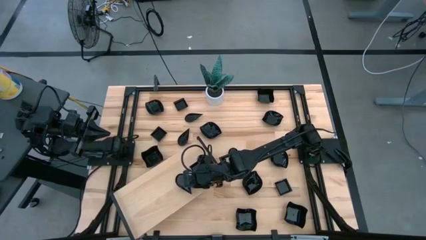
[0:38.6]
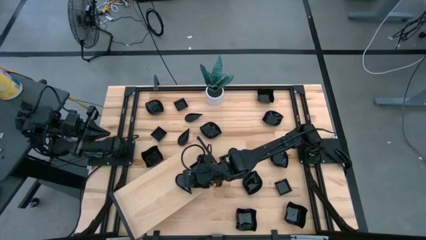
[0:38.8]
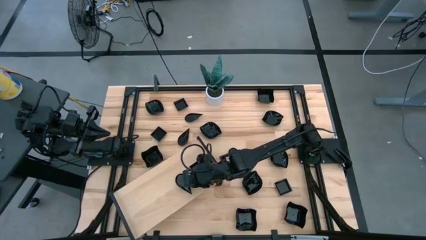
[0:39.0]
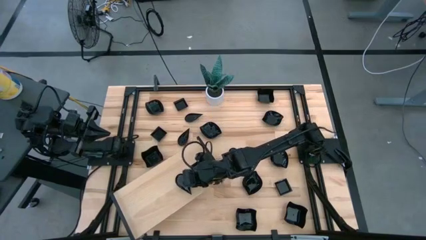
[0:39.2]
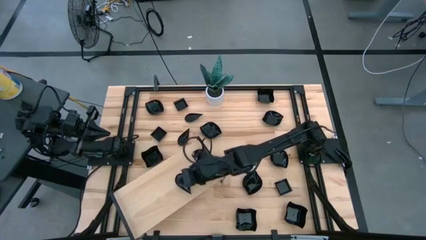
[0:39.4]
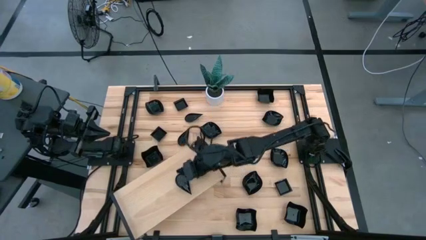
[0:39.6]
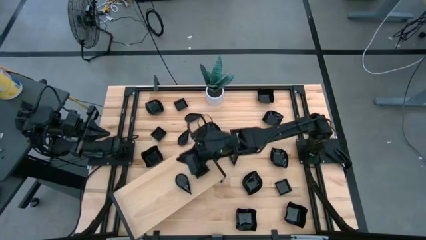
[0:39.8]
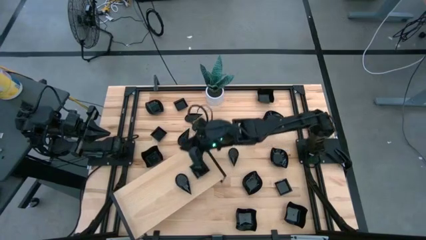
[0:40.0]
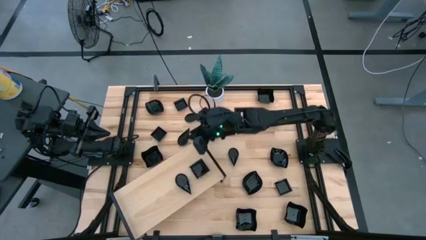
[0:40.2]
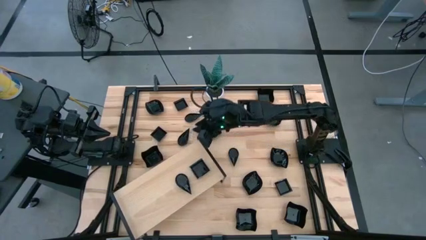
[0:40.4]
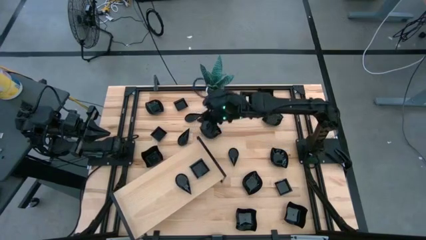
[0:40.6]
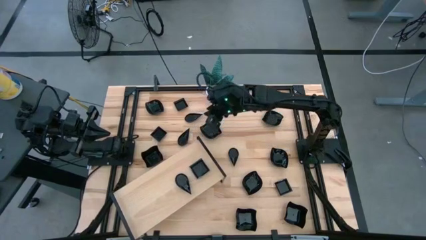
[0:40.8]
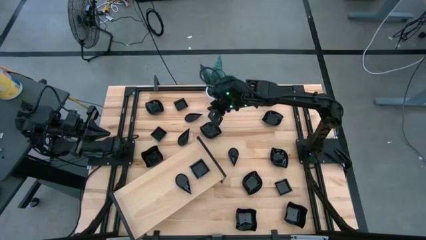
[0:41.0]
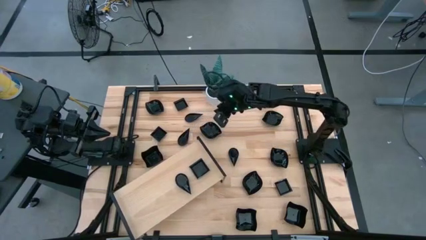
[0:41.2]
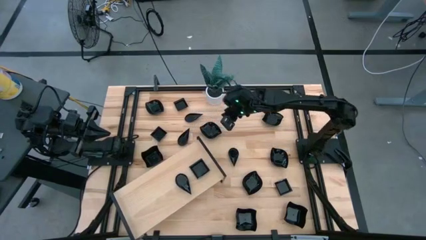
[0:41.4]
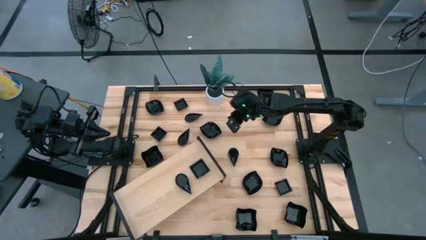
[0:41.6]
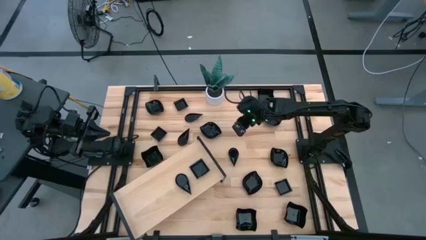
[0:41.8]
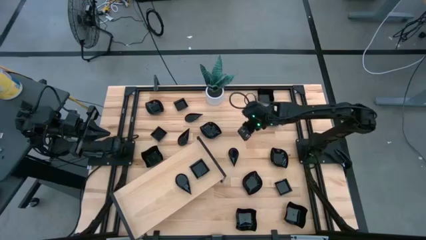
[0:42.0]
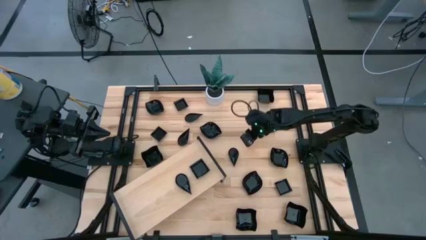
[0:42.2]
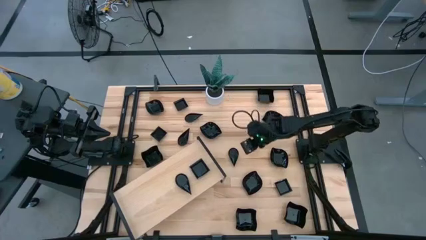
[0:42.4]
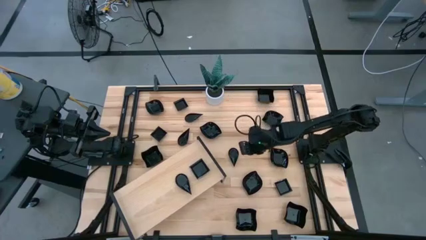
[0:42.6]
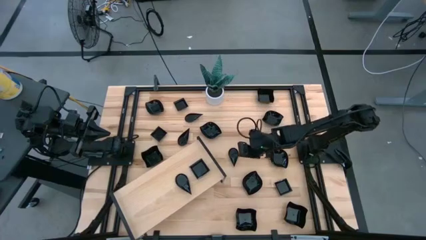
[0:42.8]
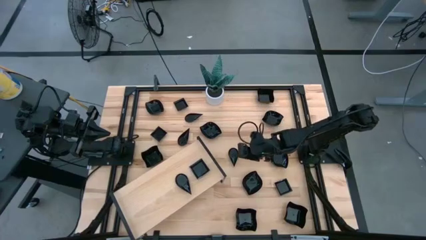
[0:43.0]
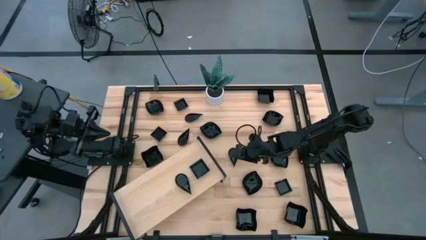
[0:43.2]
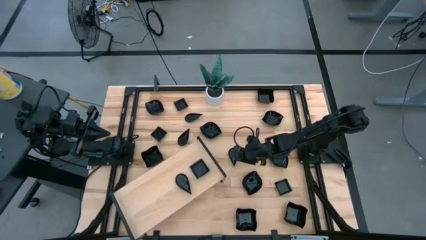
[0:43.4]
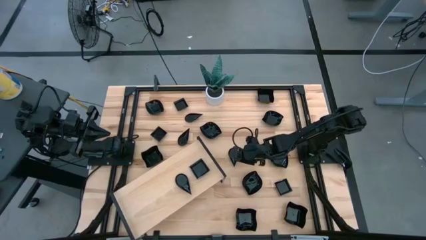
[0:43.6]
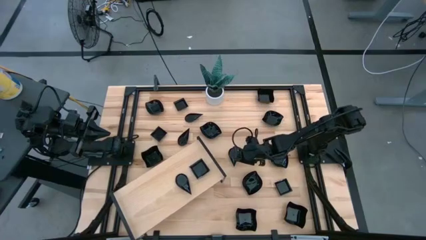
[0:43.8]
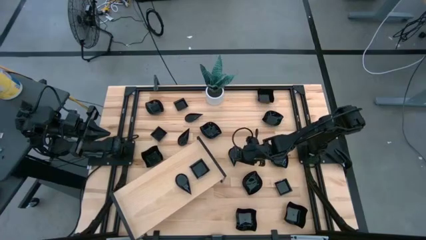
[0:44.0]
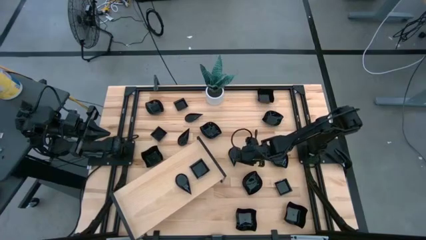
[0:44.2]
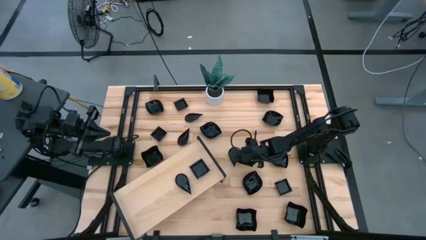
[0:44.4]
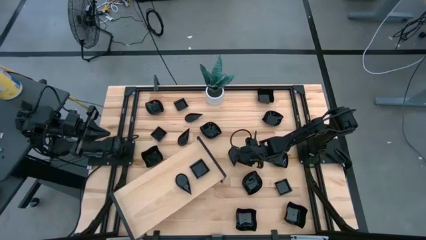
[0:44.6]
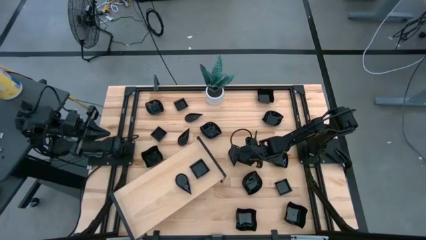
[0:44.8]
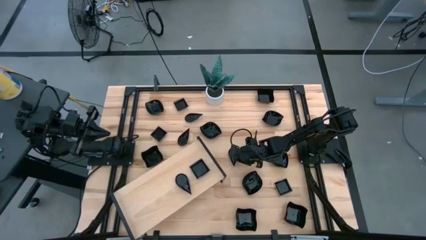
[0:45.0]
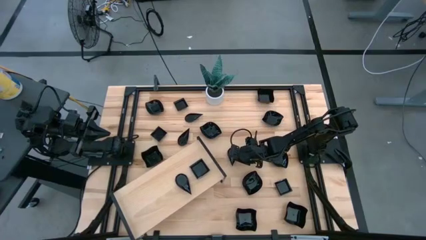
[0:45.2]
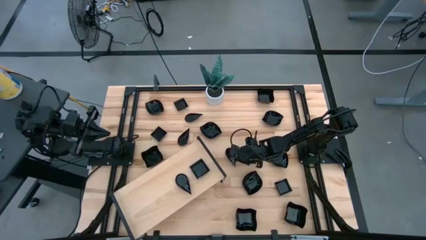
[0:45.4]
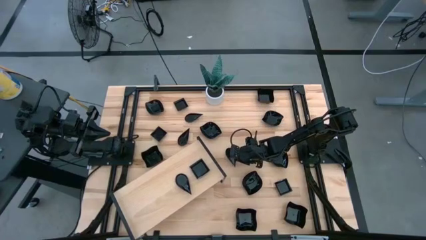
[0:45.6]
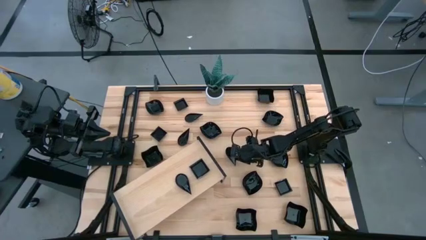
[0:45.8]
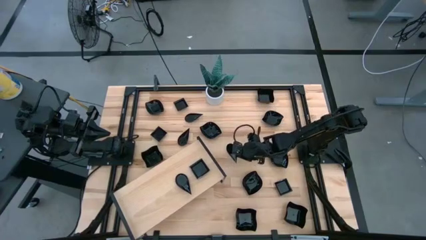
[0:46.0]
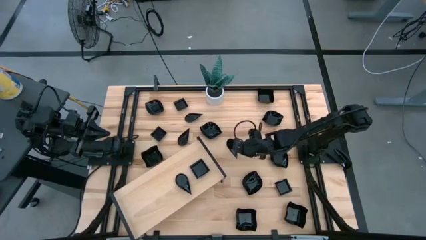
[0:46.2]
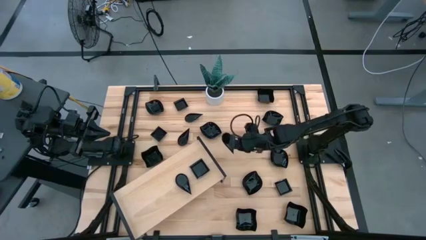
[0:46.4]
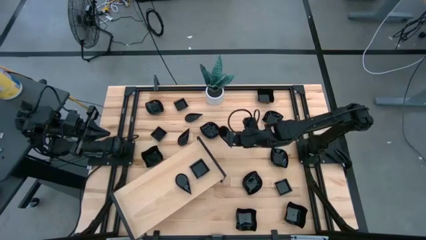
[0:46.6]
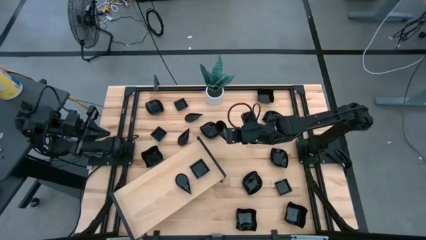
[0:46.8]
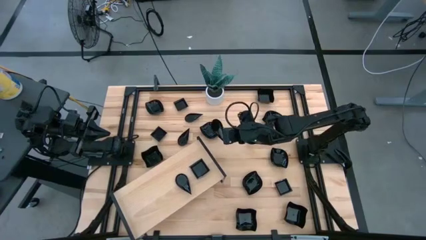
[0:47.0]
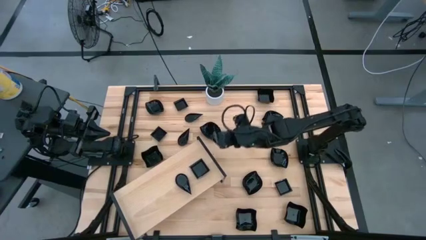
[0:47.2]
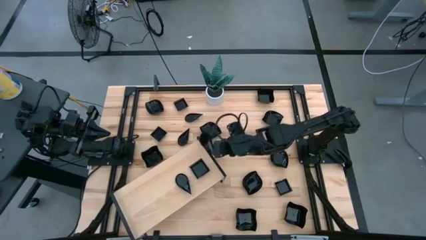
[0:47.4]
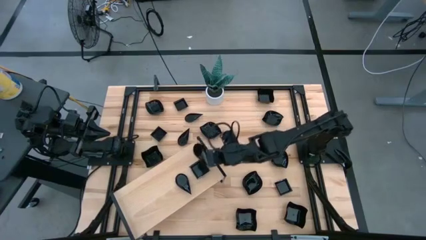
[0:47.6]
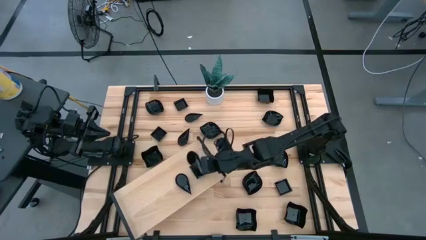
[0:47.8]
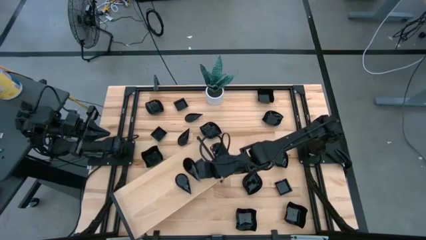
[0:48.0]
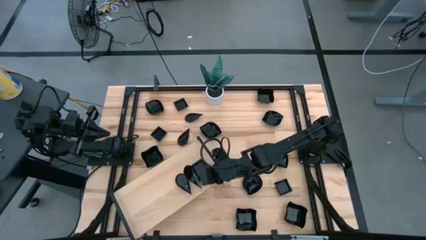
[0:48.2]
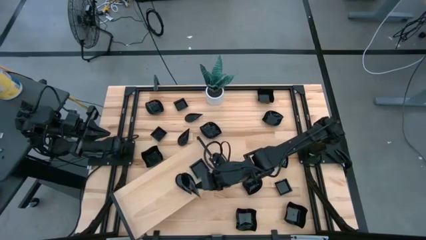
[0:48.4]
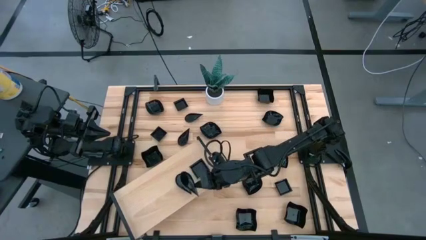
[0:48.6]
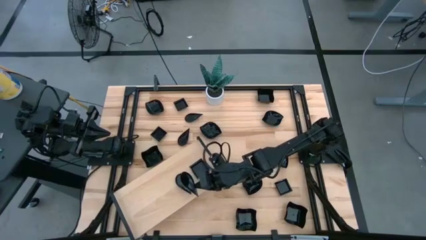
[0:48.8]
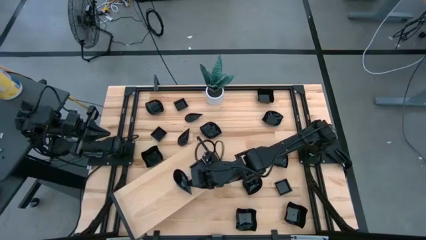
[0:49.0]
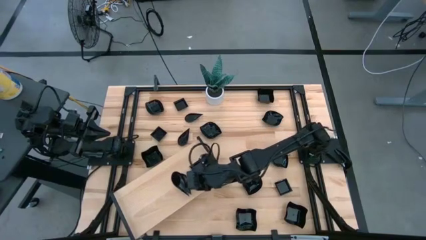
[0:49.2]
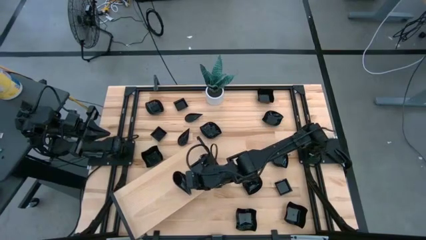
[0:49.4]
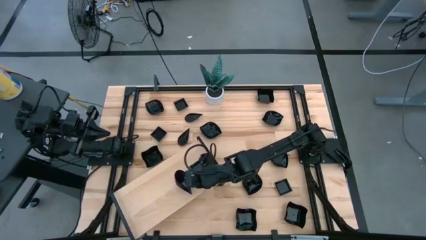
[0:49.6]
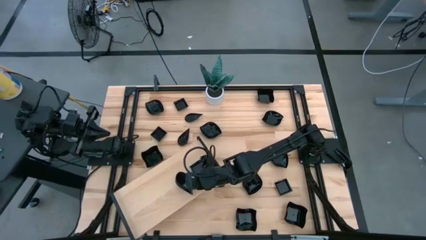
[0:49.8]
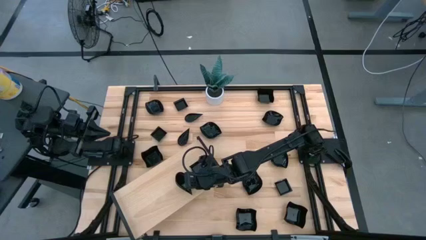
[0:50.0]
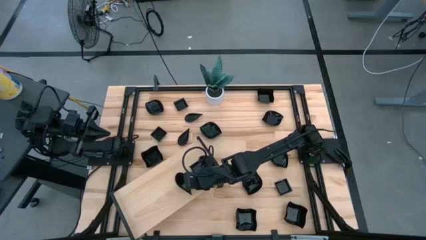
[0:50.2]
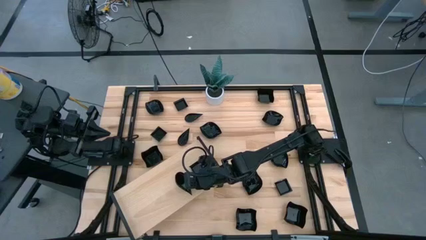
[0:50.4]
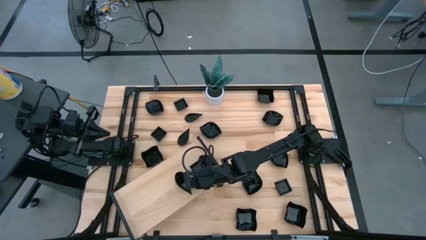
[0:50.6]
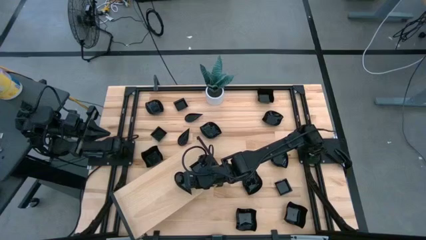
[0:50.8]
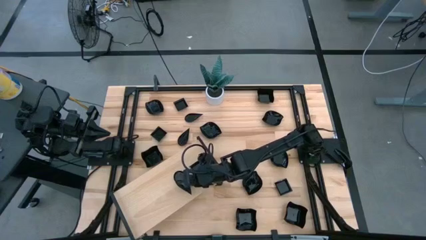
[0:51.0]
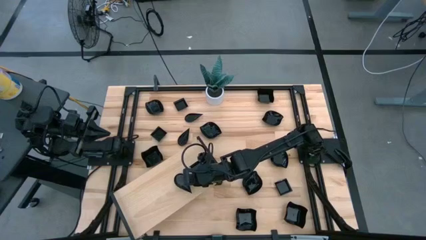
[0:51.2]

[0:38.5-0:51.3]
Task: Pick & Place Mini shaped plates
Stack the black drop shaped plate on top of the black drop shaped plate on the shelf

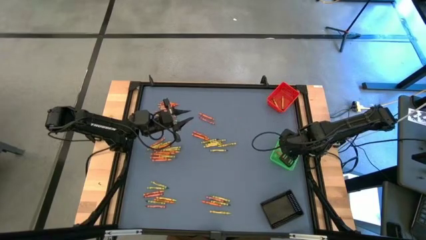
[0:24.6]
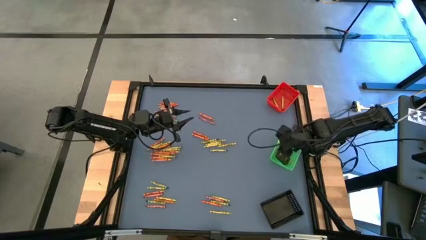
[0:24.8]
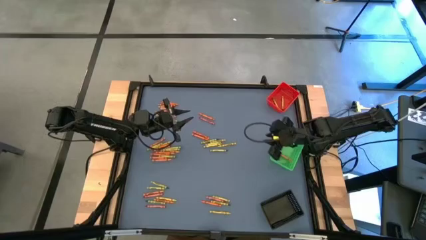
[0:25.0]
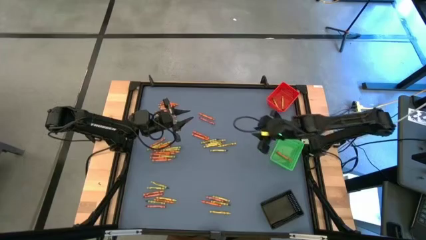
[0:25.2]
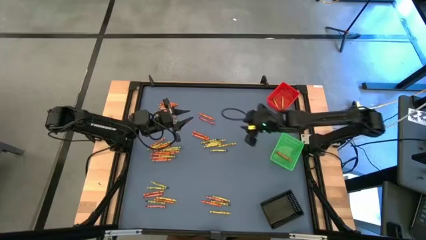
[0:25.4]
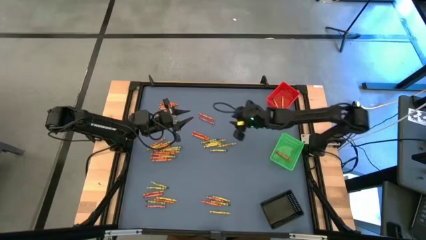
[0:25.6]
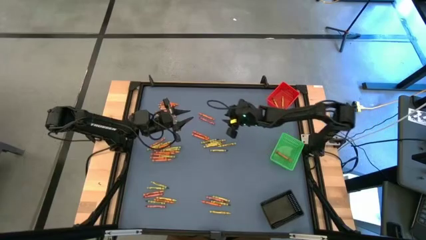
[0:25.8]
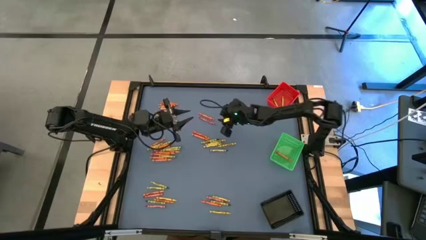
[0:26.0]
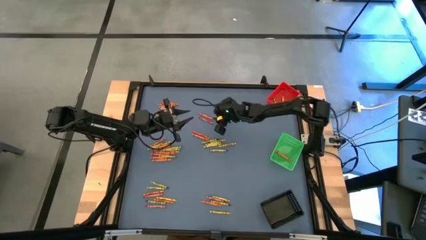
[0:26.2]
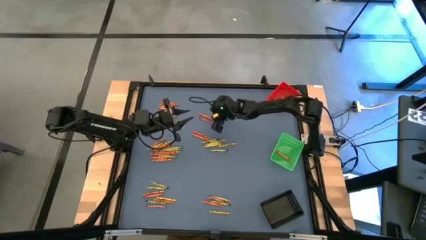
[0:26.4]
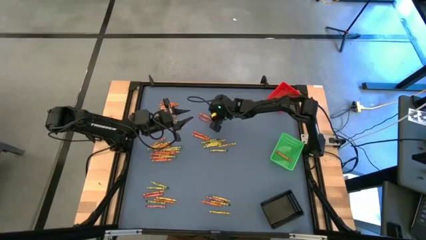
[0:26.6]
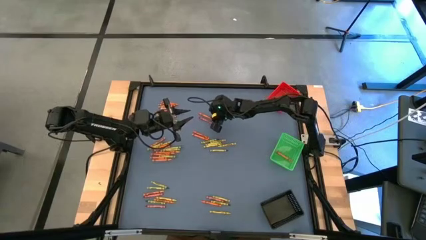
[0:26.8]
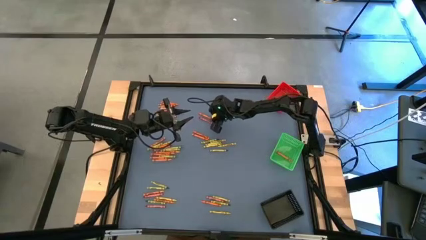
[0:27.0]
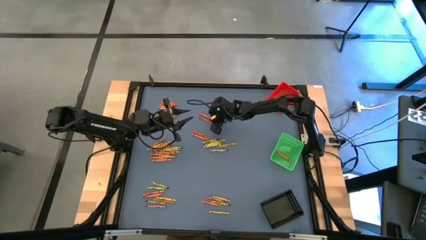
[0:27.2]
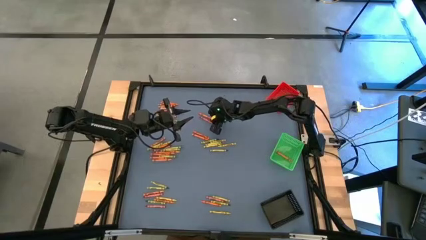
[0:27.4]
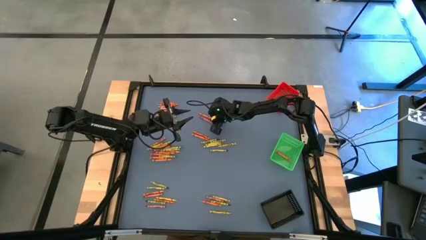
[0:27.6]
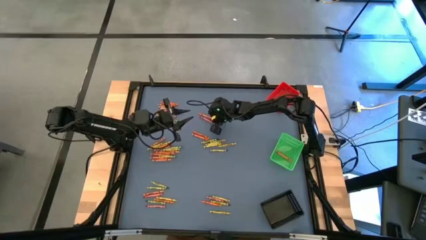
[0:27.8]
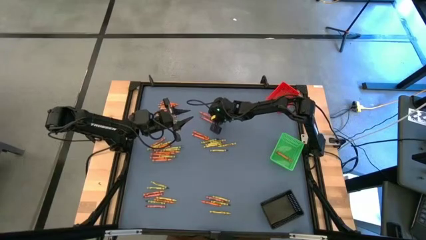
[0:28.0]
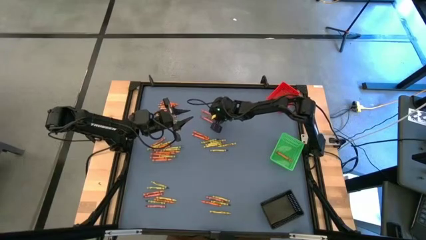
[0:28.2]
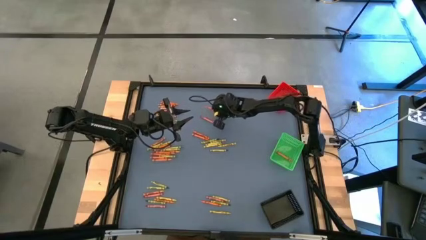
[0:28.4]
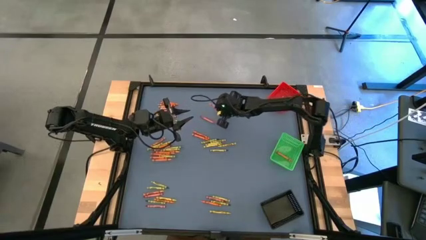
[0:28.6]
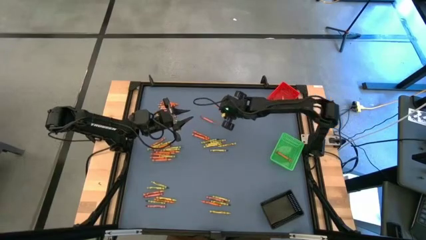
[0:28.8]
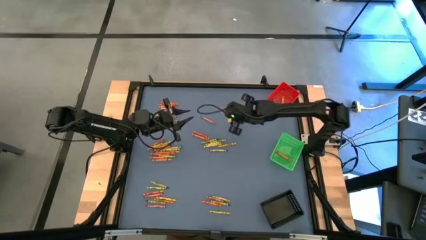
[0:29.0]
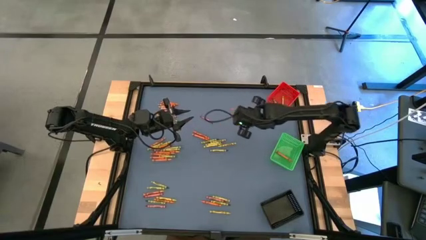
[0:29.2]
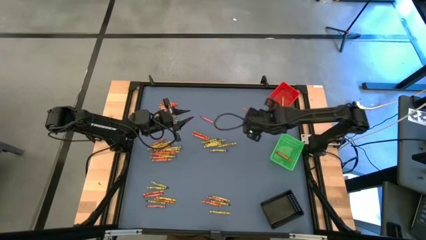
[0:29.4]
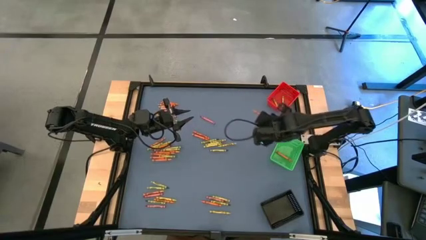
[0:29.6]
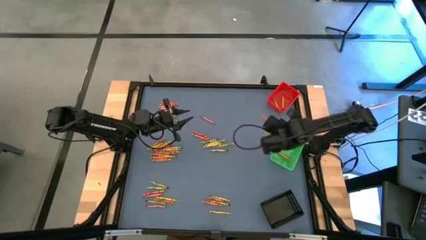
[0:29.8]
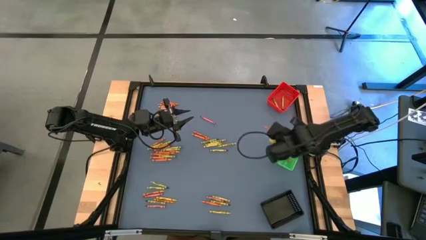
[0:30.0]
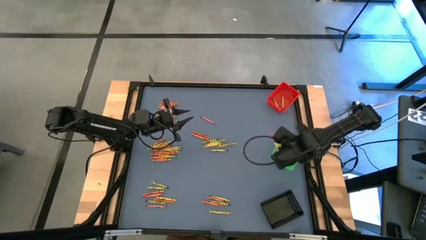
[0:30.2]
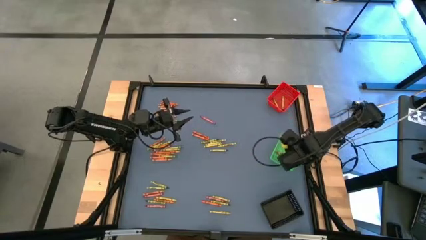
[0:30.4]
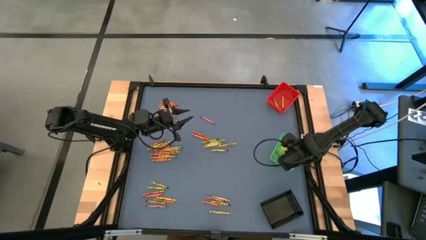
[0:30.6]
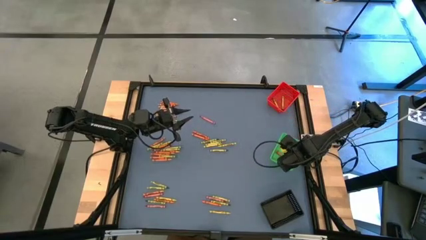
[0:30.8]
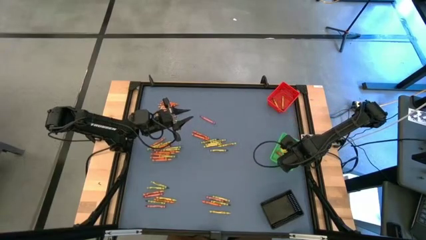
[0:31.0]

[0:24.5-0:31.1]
Task: Sort crayons
Put the orange crayon into the green bin
